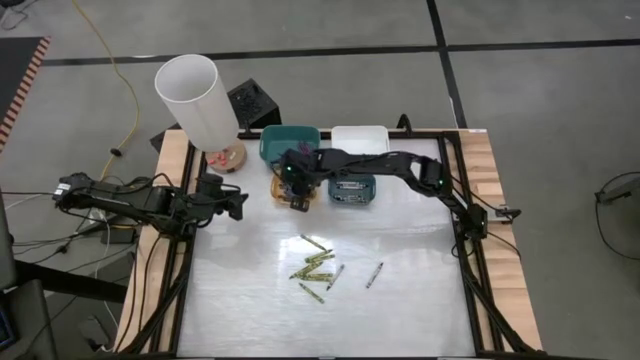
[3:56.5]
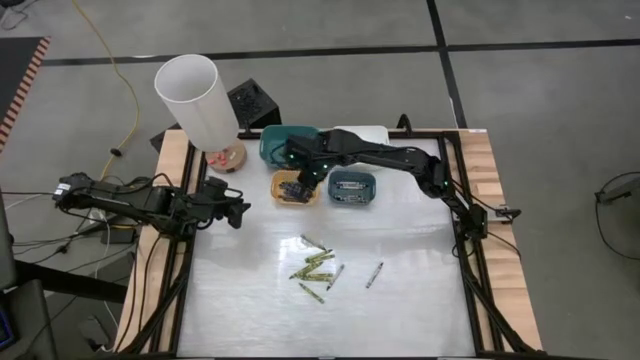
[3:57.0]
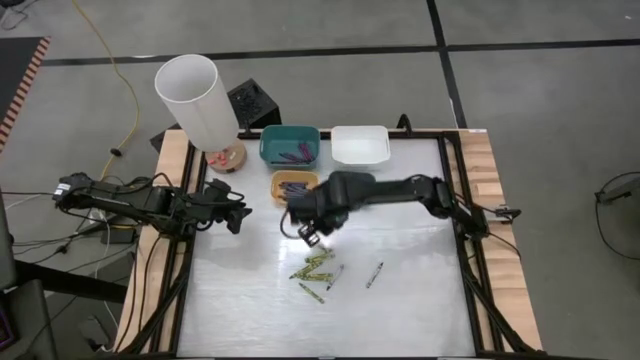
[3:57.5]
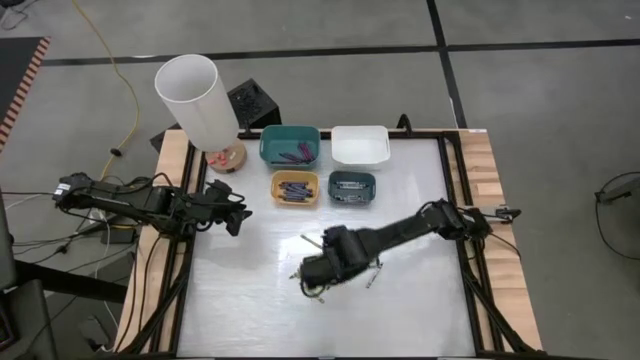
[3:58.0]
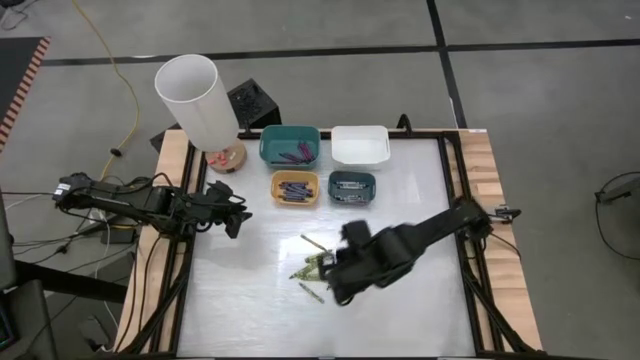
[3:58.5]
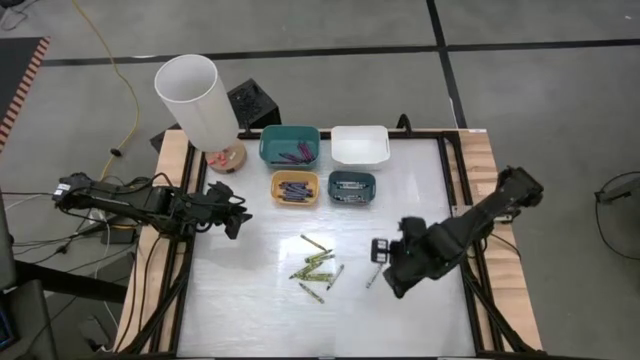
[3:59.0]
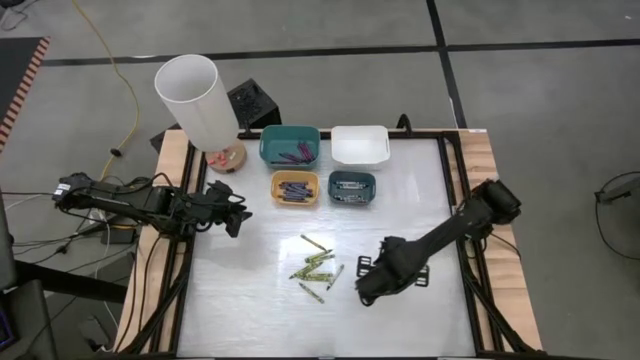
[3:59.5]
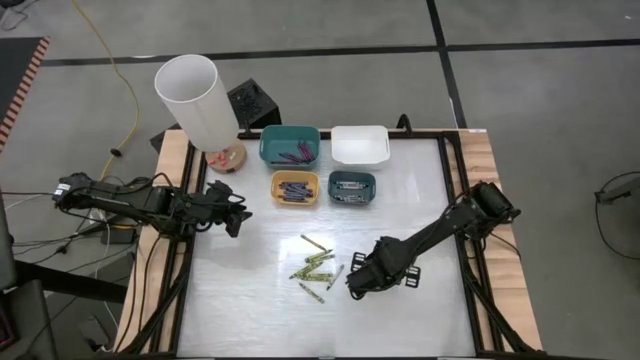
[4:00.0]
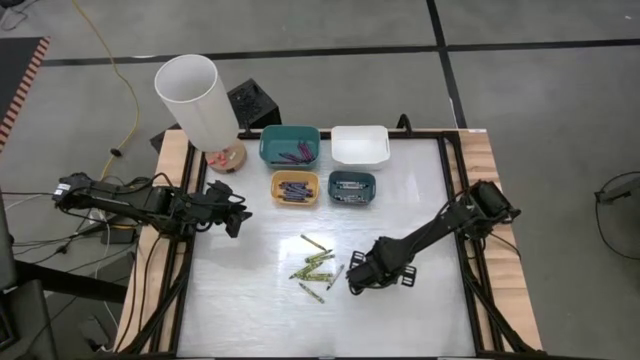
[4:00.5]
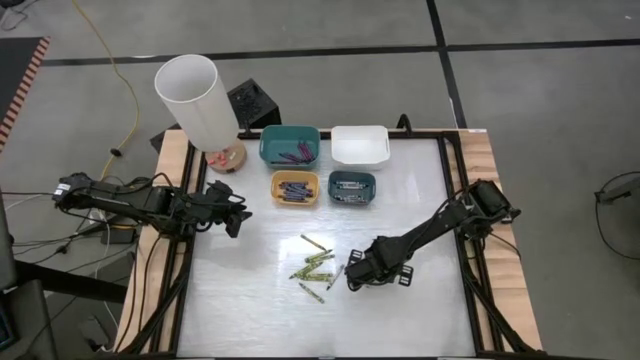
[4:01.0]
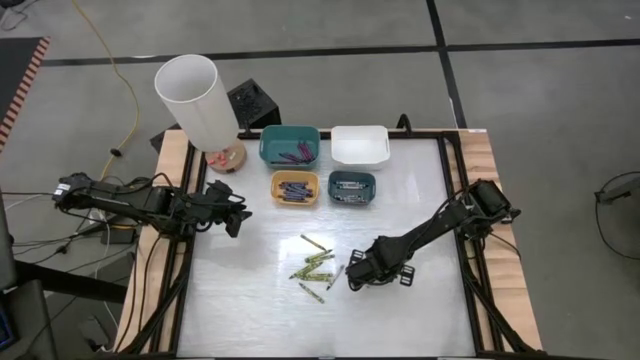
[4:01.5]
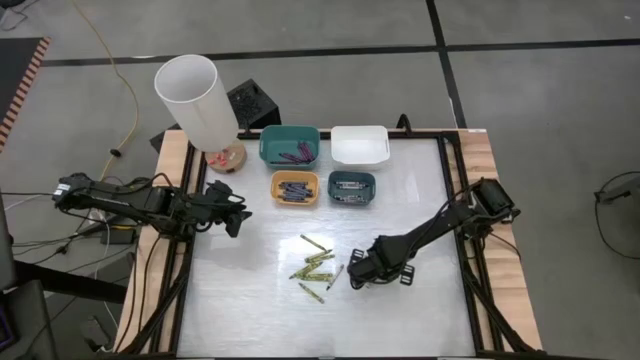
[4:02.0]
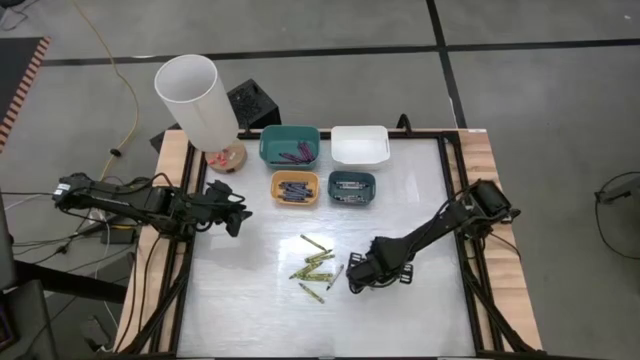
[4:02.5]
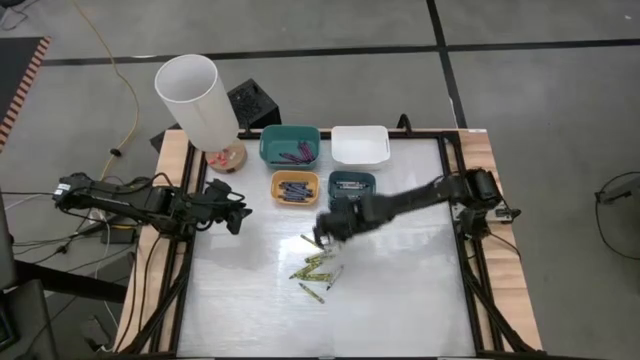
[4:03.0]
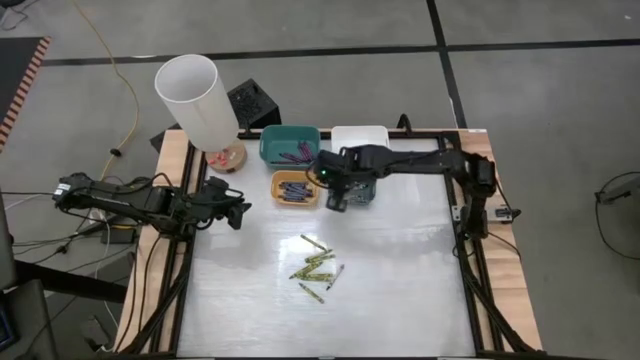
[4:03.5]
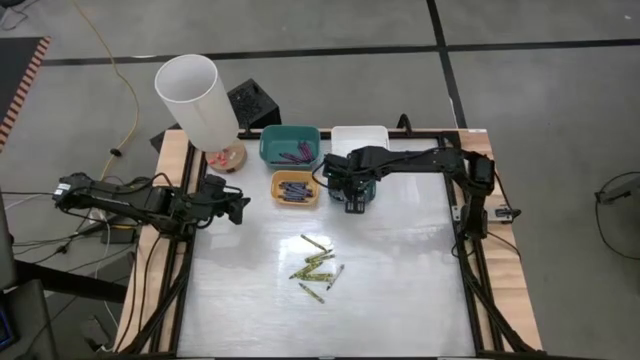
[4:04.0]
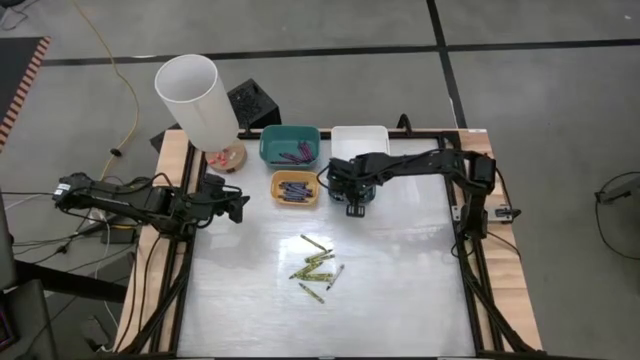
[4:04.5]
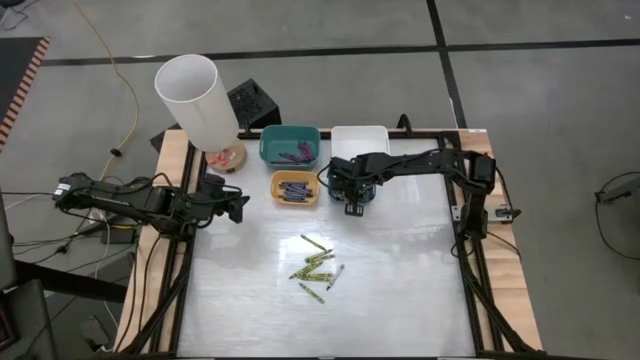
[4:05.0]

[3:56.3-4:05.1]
Task: Sort crayons
Put the black crayon into the blue bin

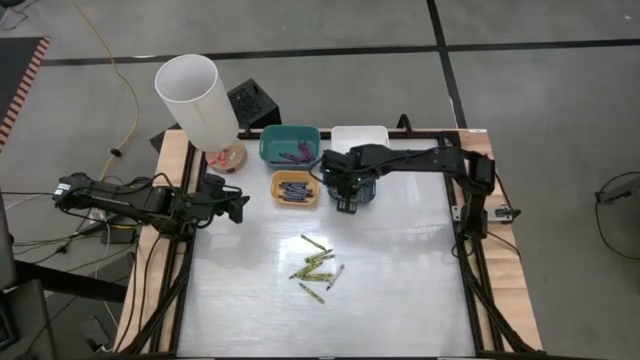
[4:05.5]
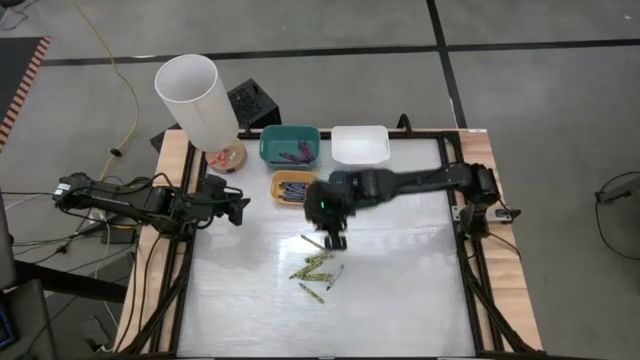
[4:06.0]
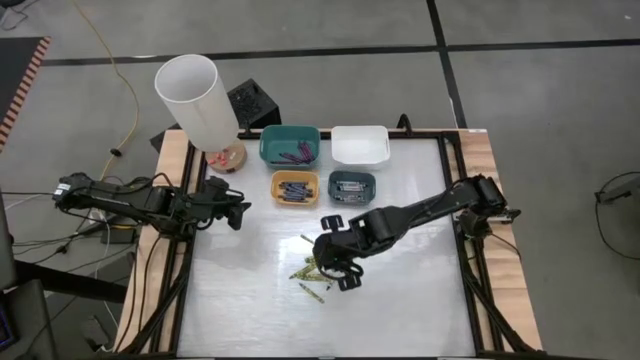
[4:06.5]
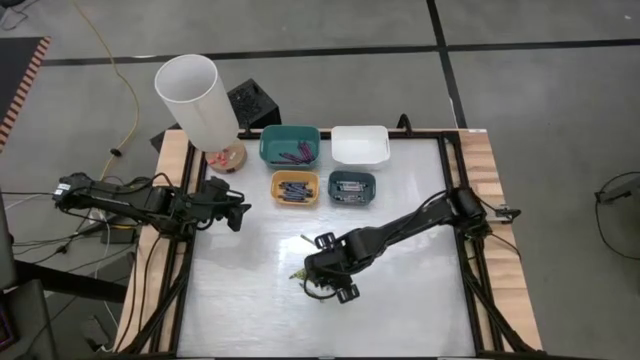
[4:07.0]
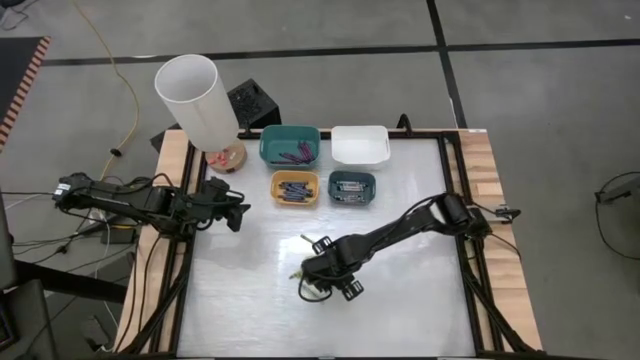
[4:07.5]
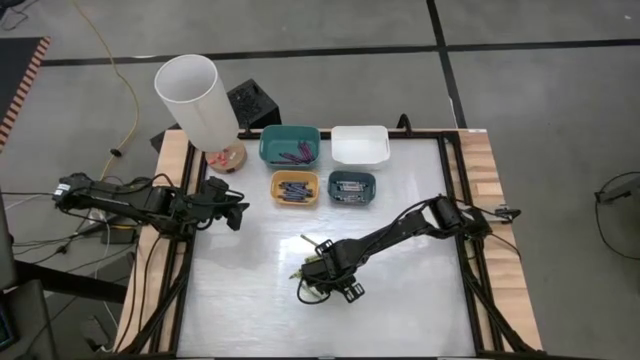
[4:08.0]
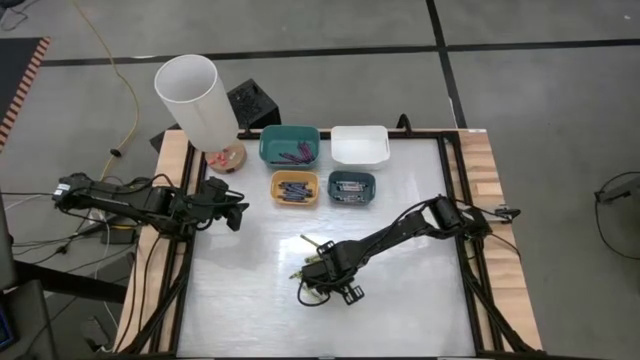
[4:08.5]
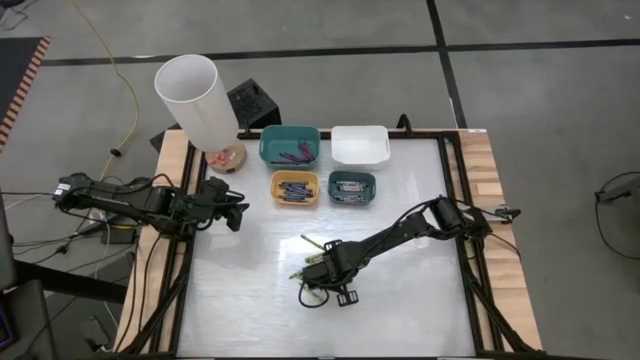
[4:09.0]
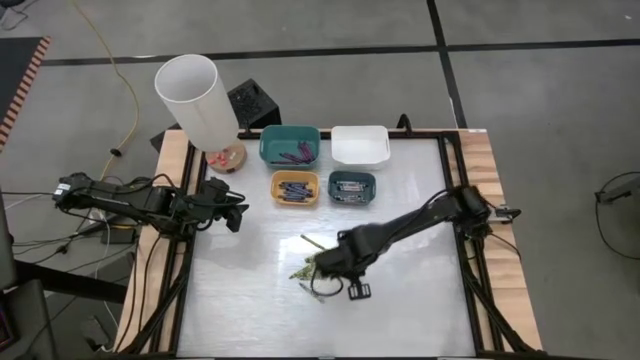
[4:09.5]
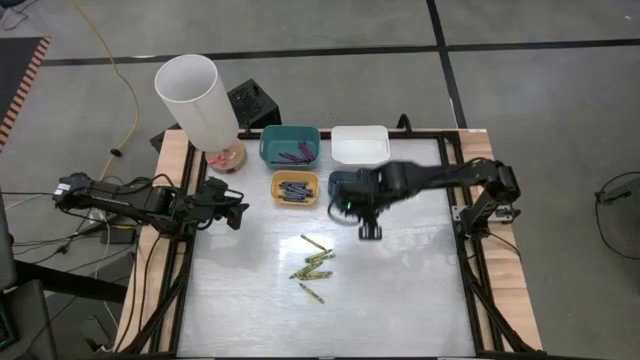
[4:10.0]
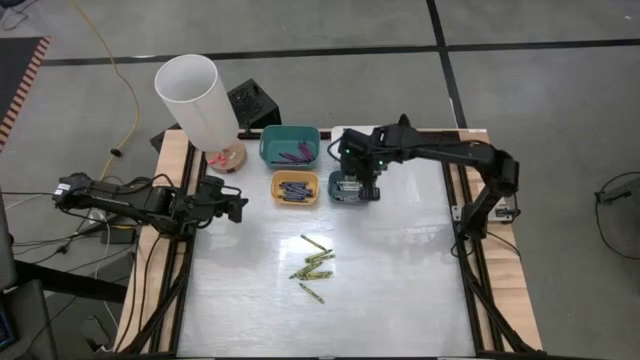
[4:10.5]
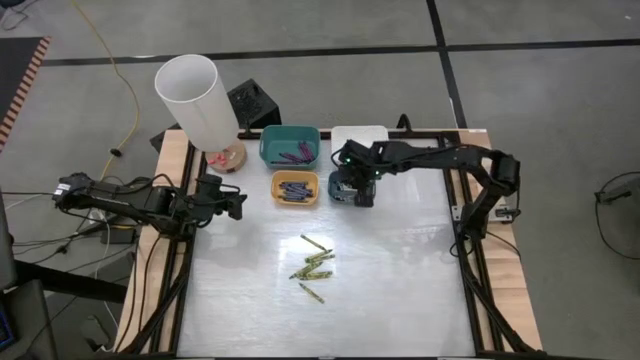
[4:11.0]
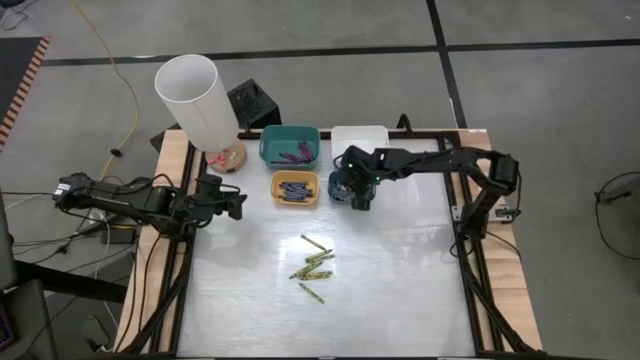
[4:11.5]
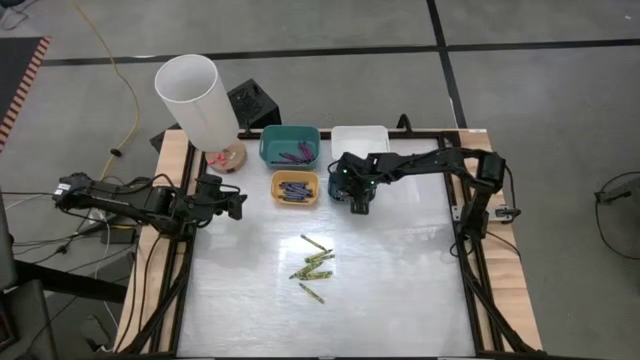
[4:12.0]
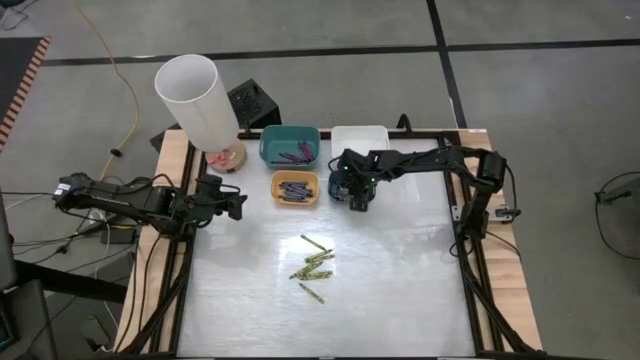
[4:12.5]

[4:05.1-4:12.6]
Put the black crayon into the blue bin

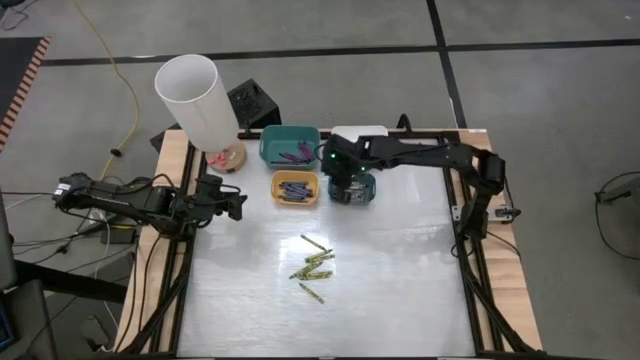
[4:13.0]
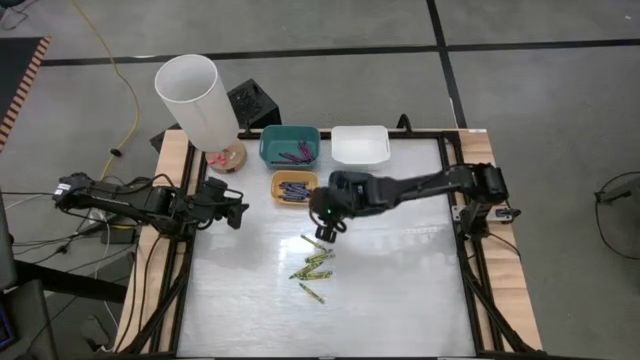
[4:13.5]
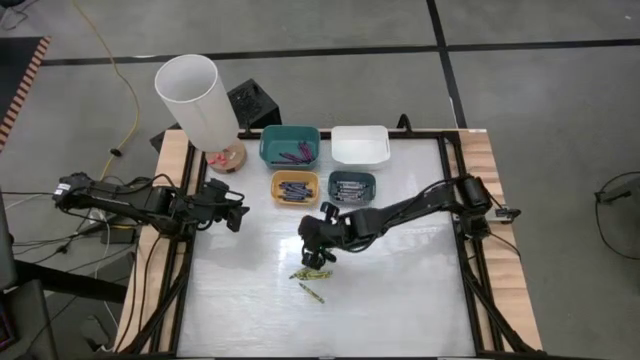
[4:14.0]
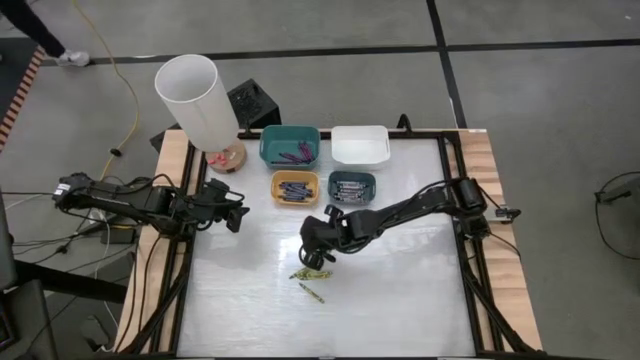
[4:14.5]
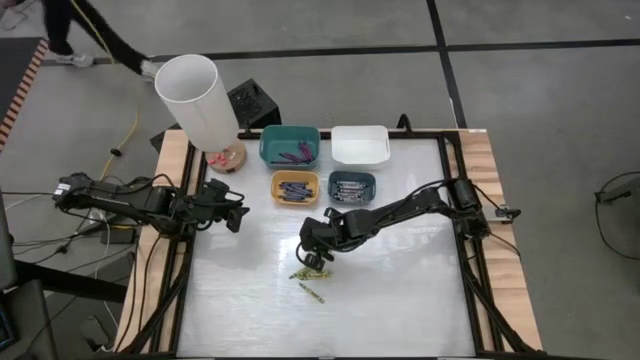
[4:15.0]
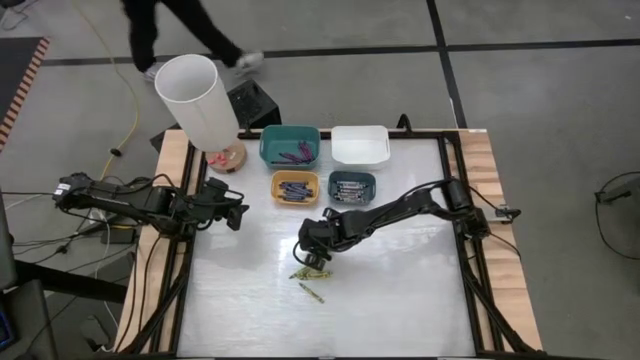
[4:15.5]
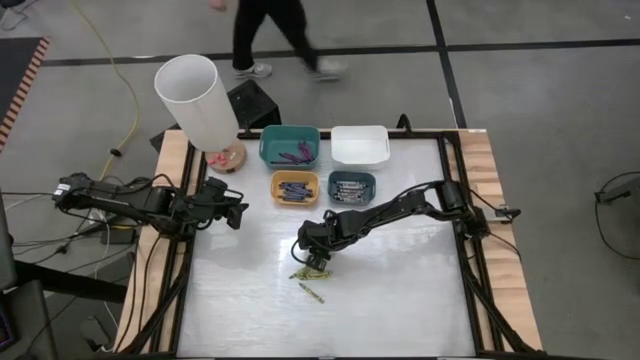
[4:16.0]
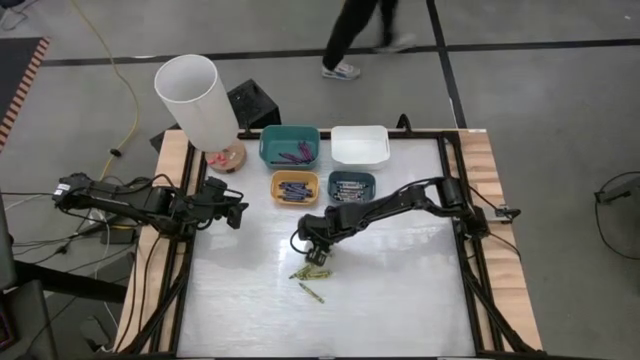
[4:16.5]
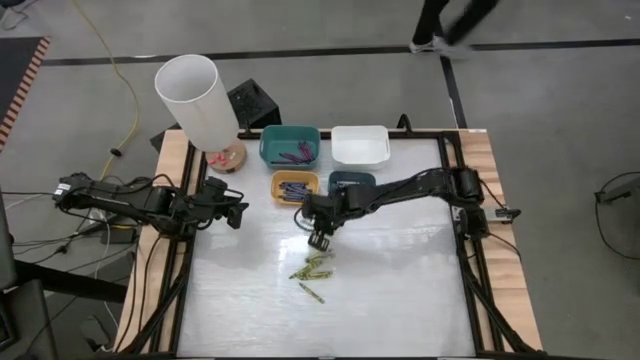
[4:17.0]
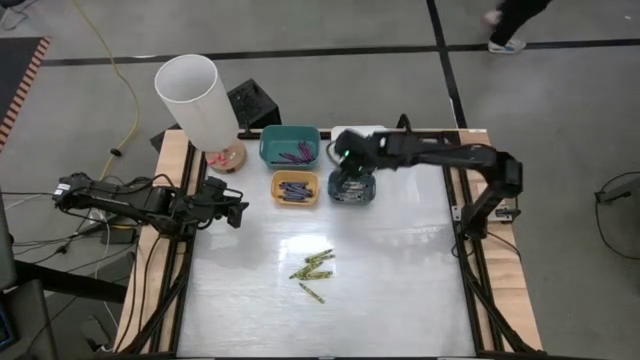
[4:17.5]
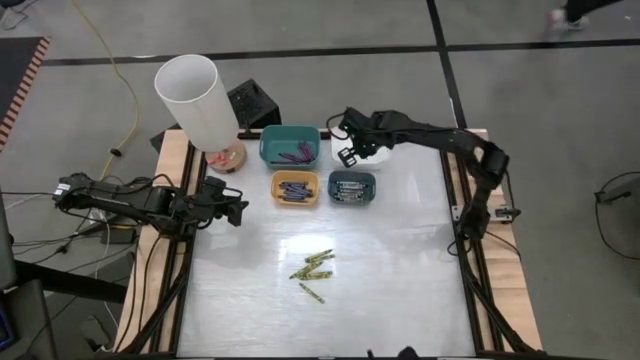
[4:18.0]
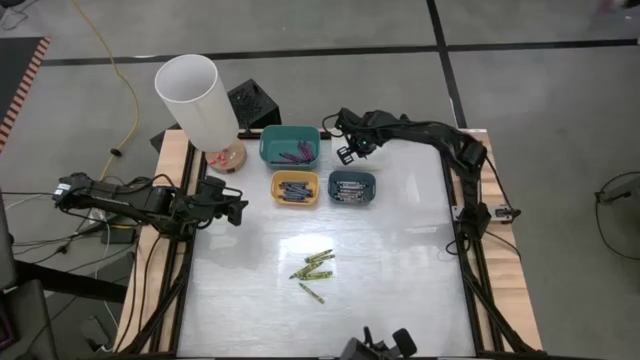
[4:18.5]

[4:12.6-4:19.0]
Put the green crayon into the white bin
